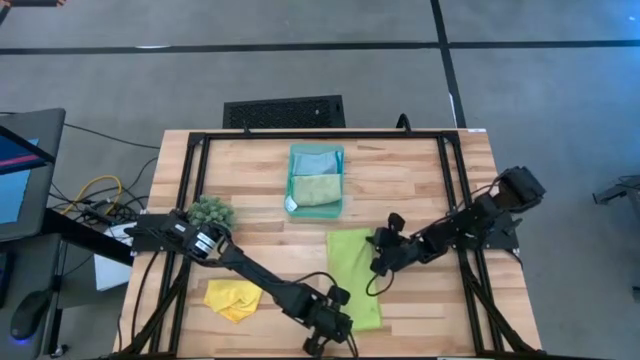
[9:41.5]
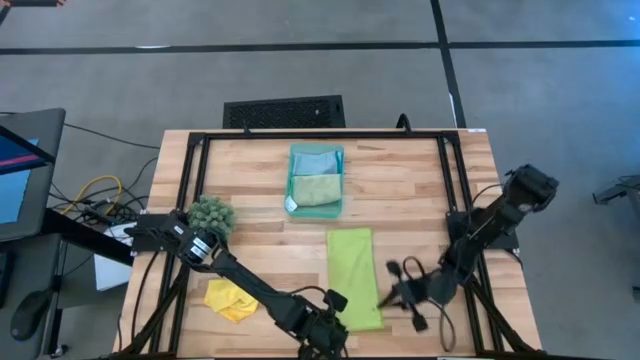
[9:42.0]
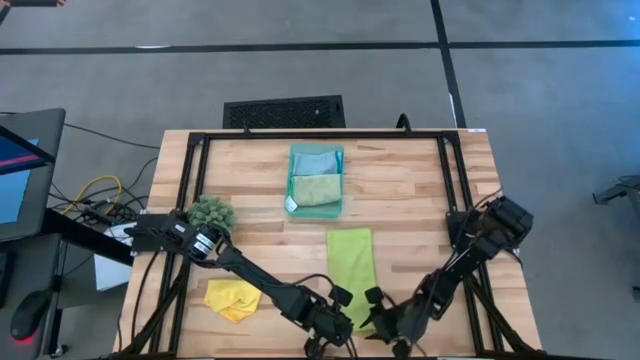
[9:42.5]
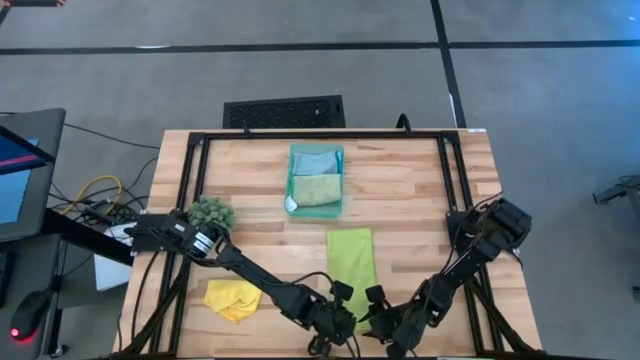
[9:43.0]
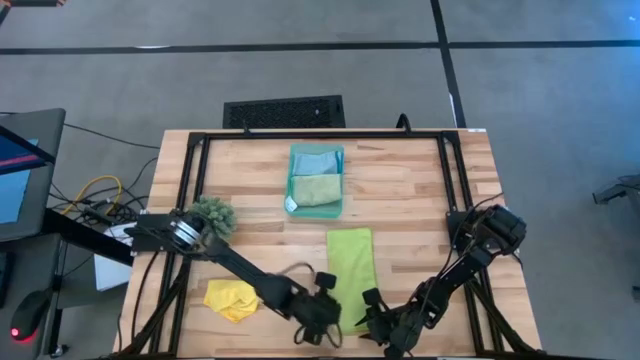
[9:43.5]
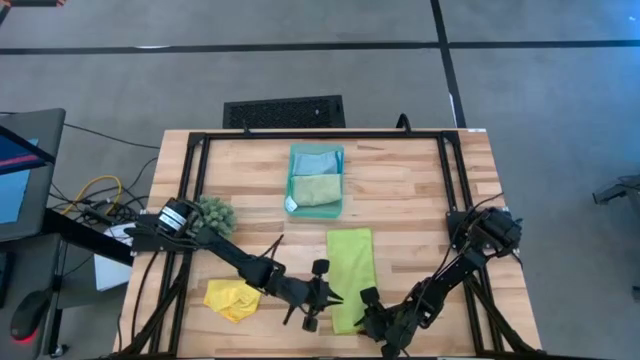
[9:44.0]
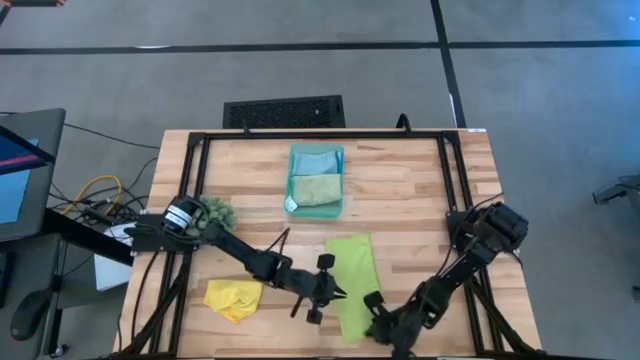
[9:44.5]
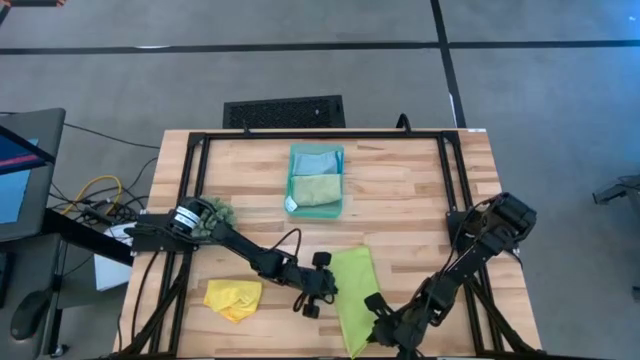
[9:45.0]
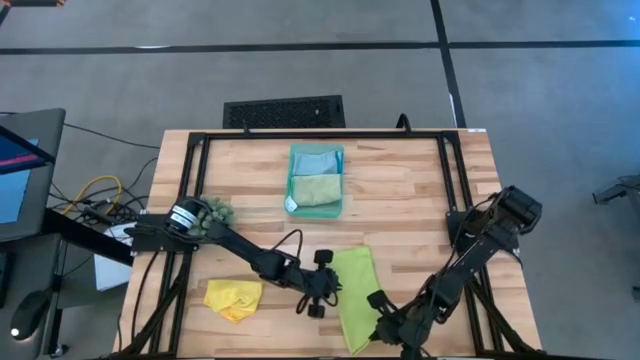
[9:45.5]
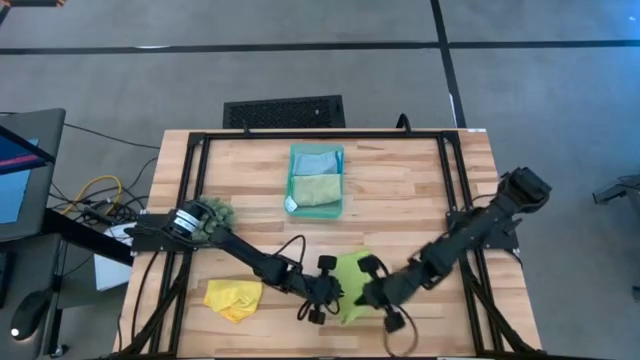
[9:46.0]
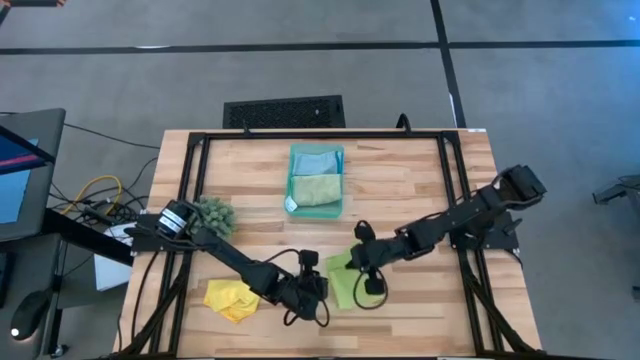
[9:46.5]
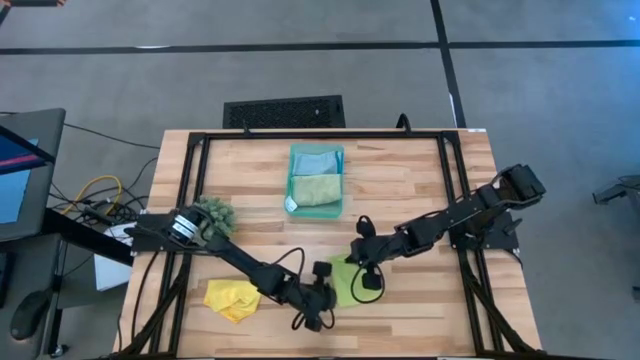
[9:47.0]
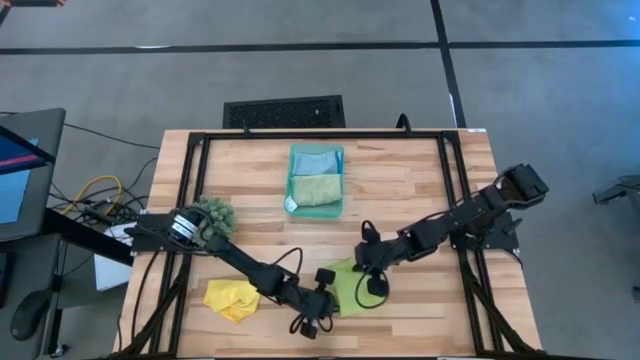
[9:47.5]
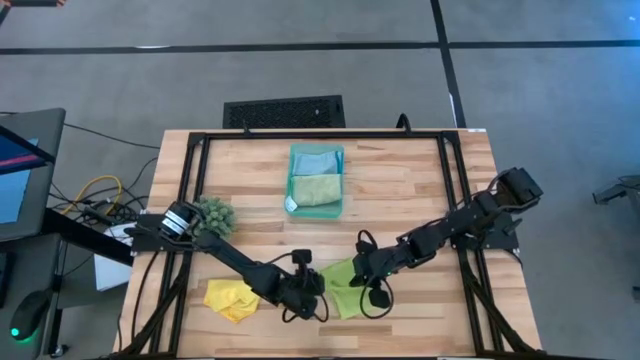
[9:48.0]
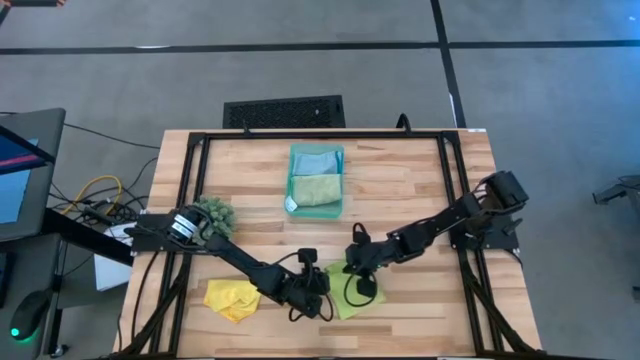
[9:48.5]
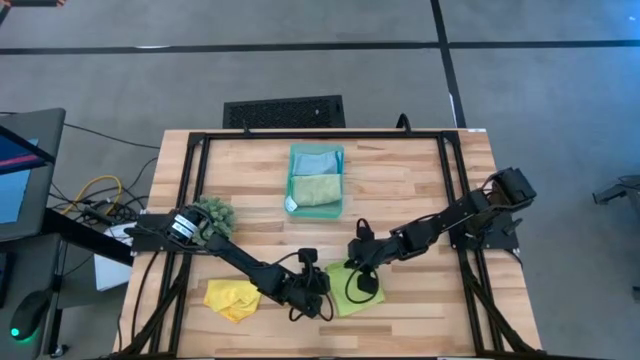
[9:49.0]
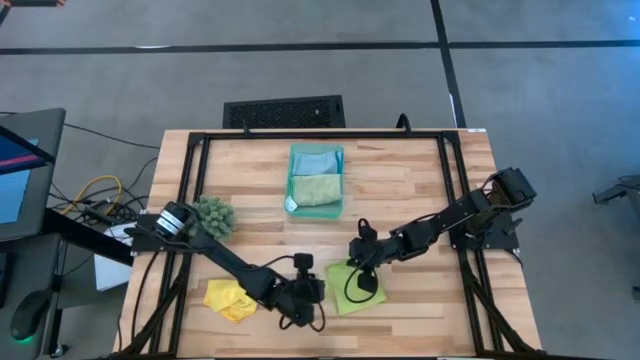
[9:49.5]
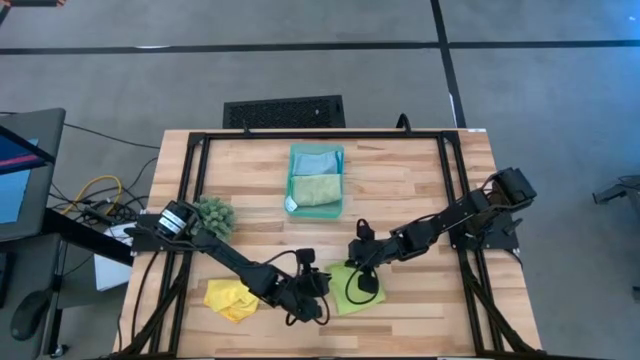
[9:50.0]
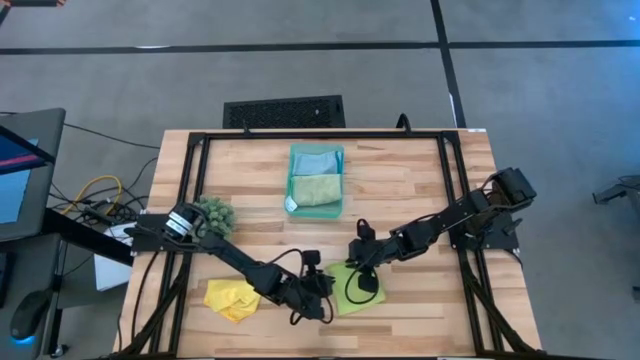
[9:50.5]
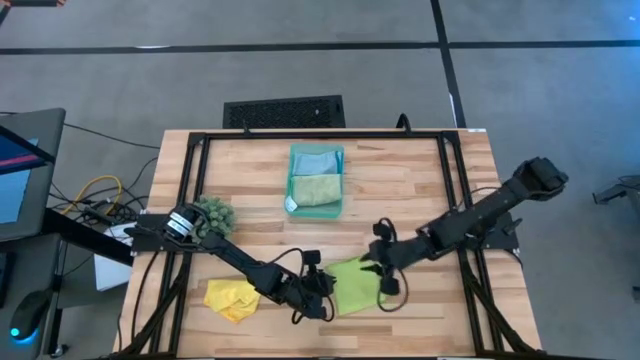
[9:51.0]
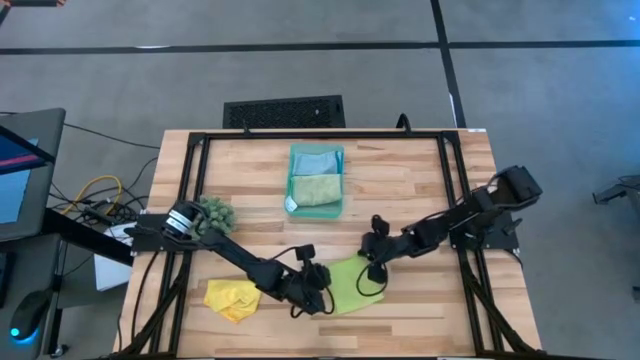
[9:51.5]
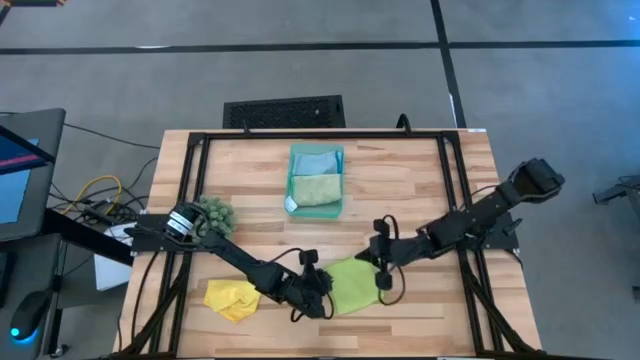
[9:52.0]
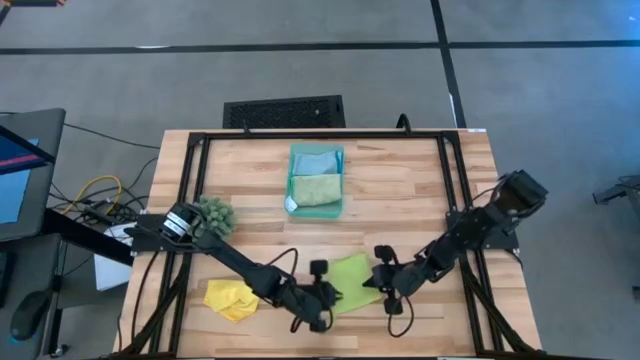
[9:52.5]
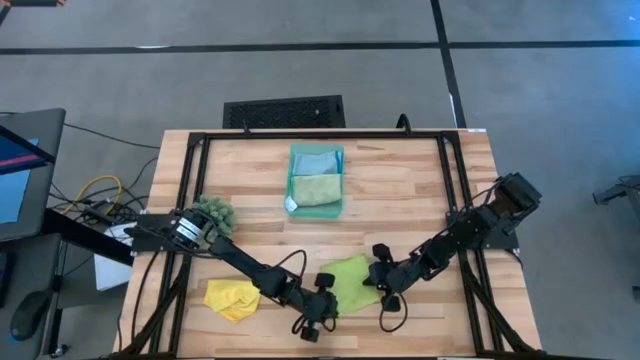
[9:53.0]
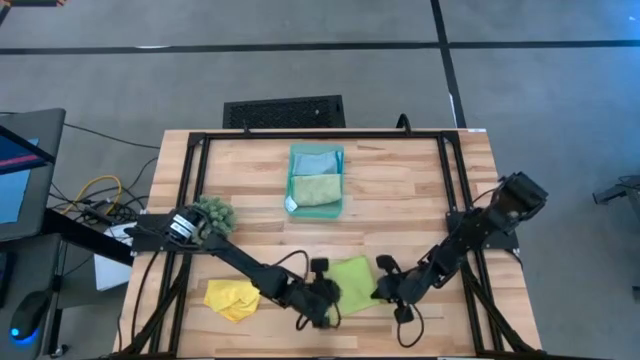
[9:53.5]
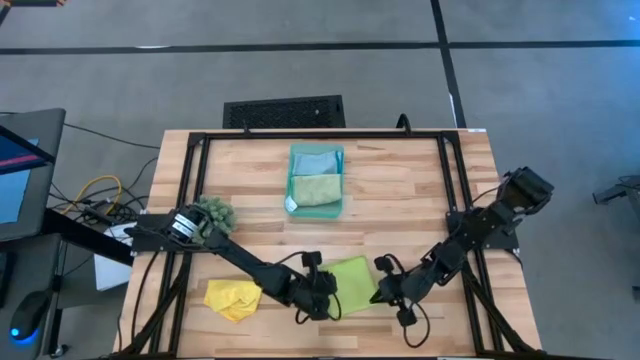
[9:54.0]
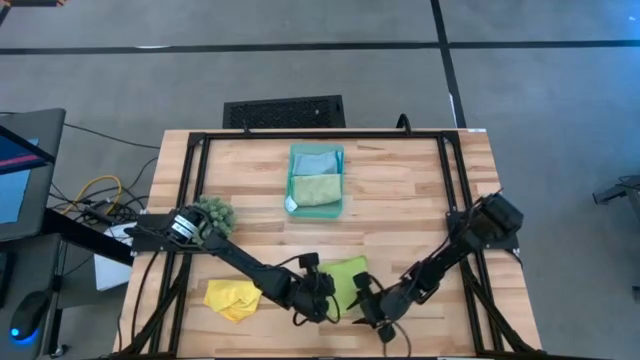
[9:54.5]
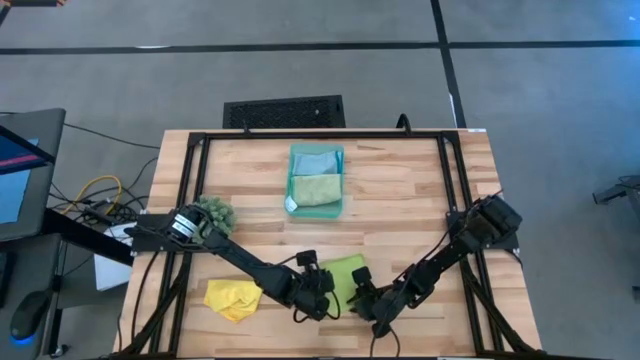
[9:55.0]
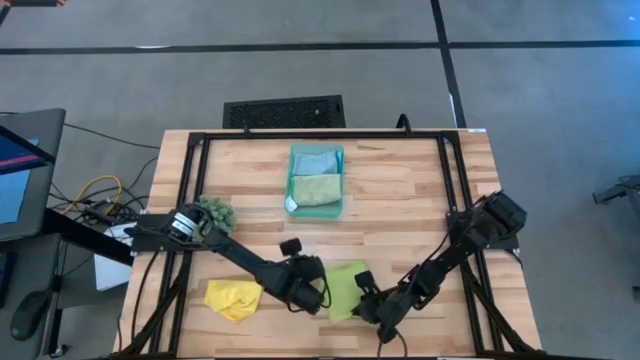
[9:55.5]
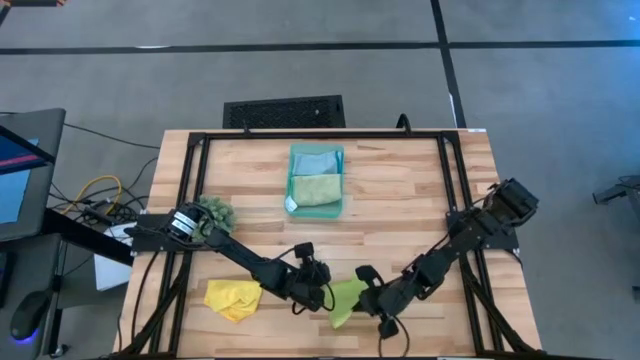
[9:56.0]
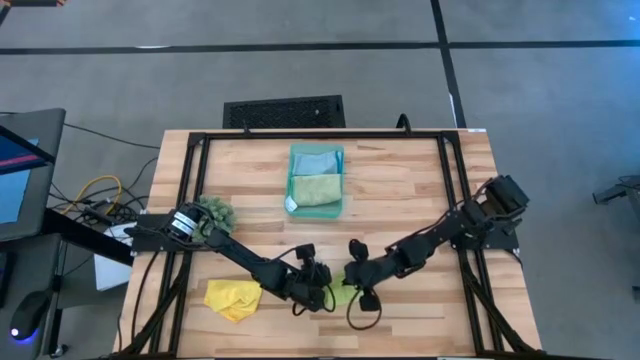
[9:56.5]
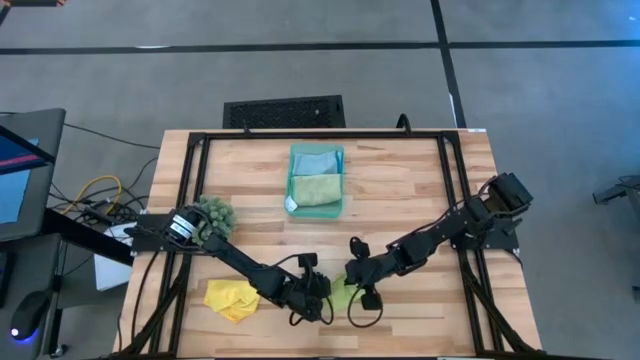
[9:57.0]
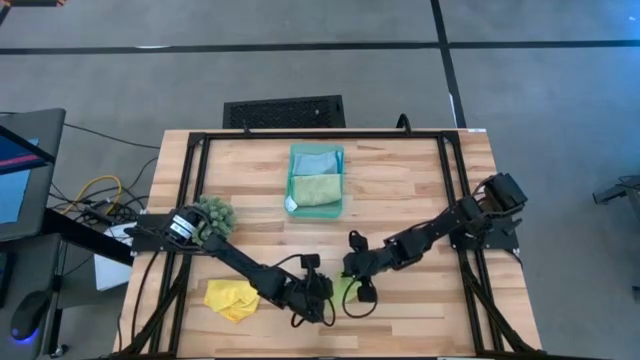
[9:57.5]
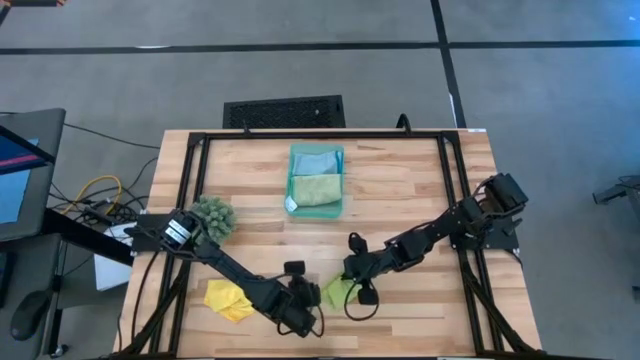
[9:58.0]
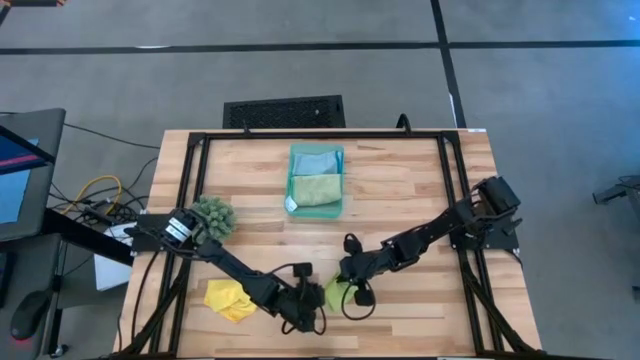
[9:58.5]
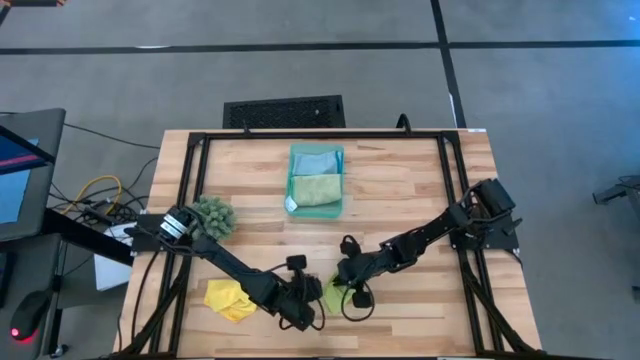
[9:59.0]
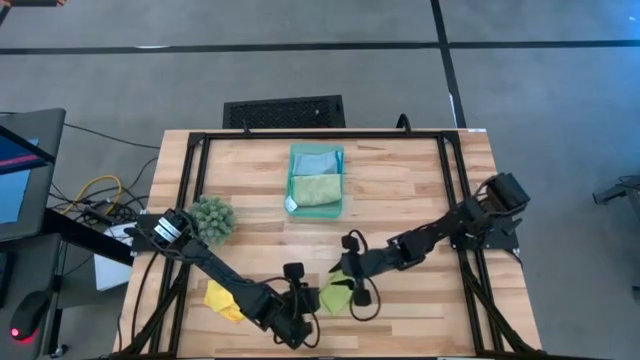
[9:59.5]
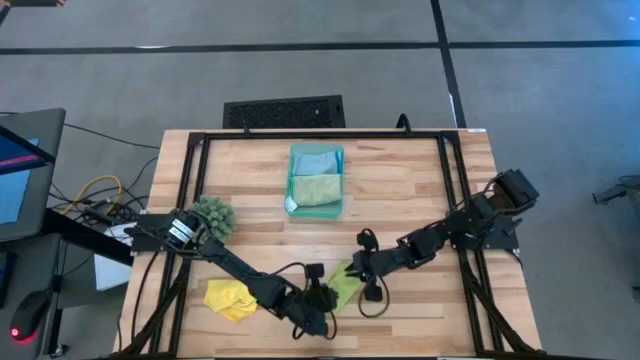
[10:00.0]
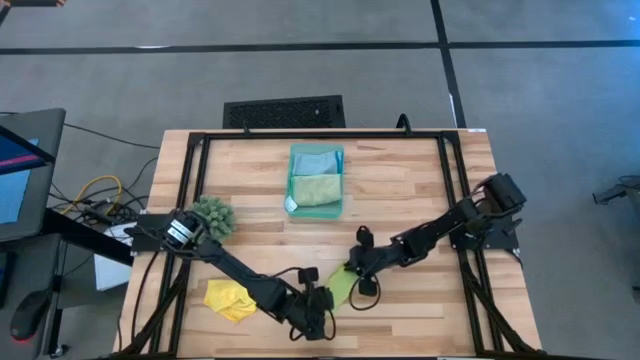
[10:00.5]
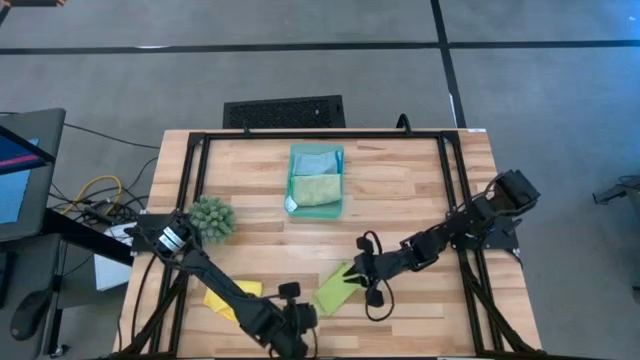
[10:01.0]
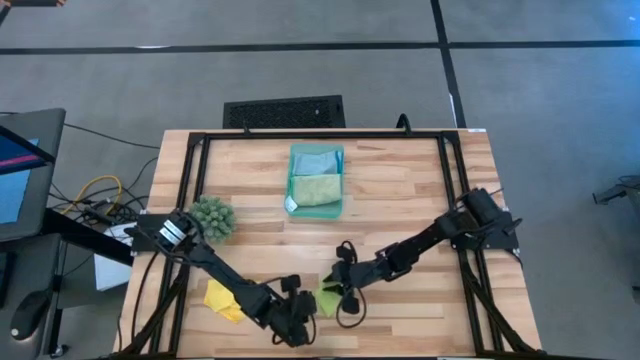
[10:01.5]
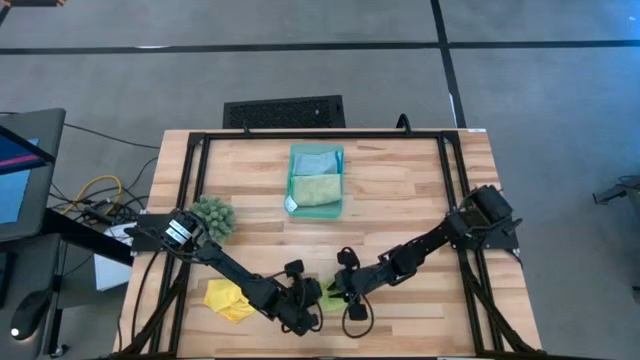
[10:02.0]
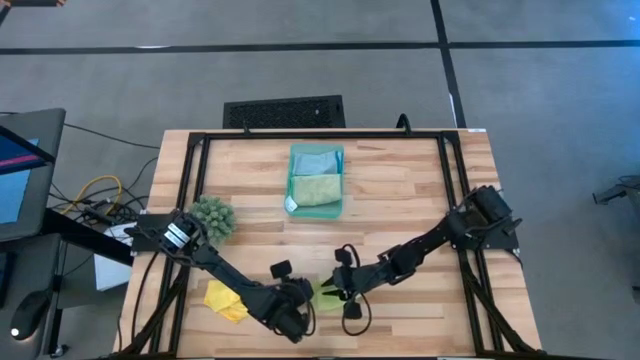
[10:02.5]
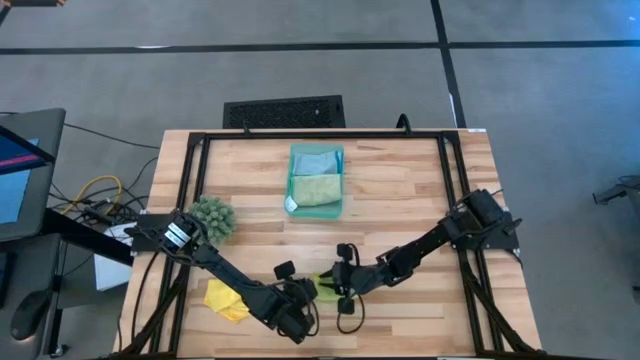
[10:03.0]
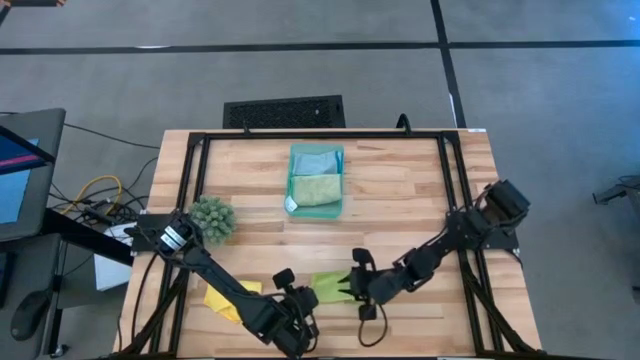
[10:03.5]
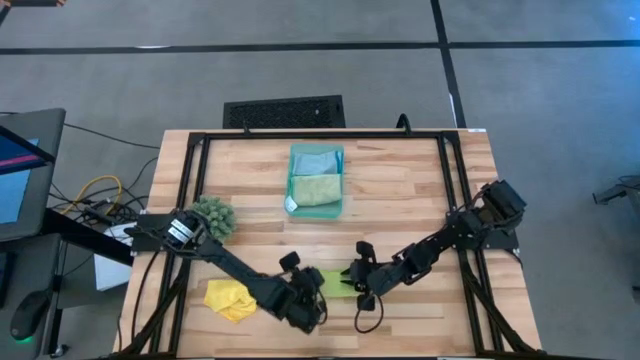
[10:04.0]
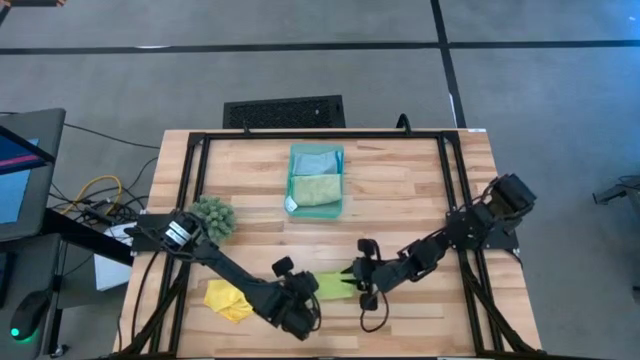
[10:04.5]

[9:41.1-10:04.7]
Task: Fold microfiber towels
Fold the light green microfiber cloth
